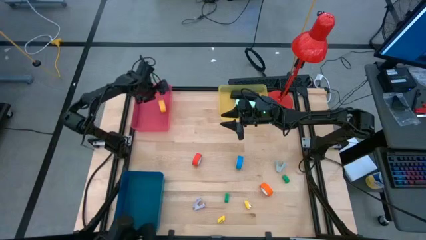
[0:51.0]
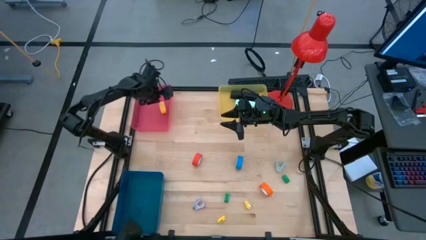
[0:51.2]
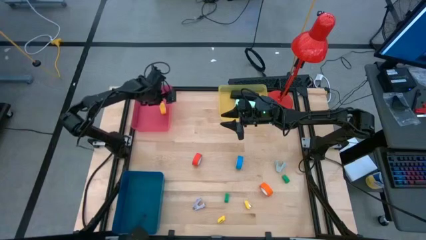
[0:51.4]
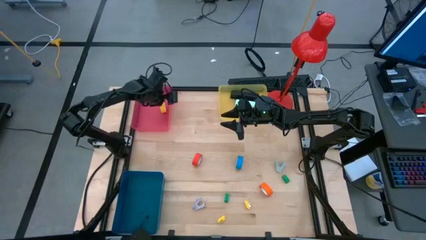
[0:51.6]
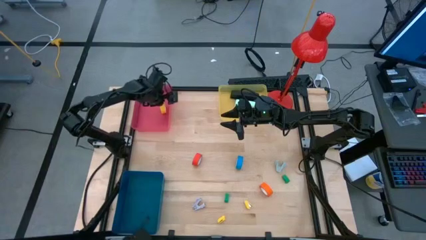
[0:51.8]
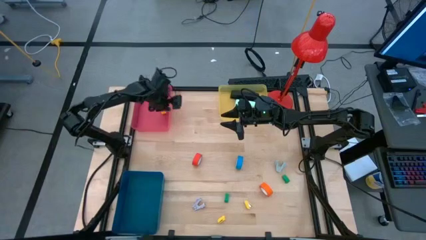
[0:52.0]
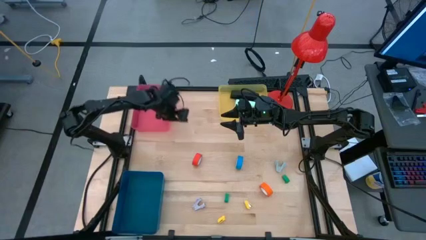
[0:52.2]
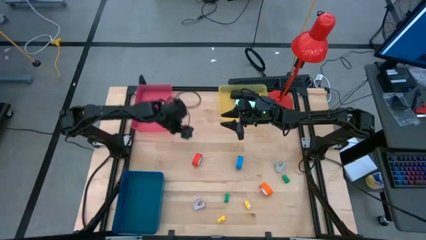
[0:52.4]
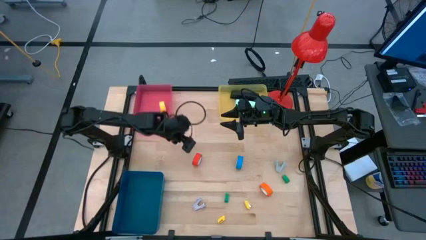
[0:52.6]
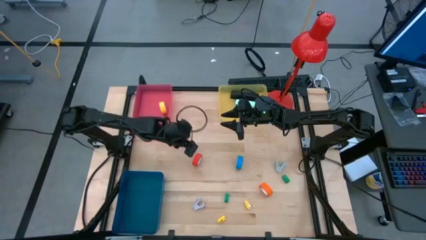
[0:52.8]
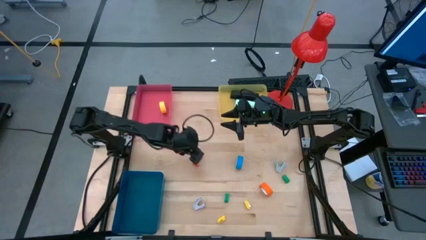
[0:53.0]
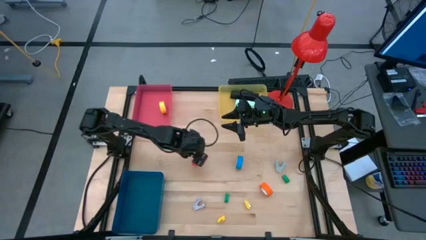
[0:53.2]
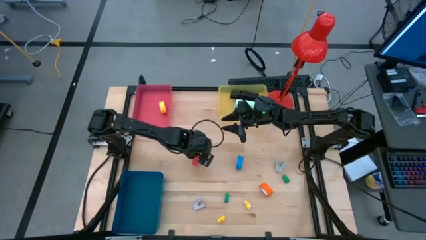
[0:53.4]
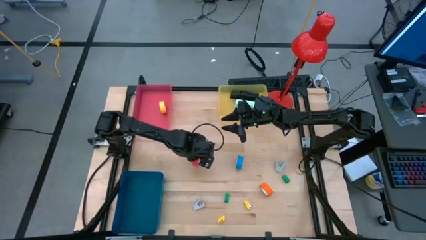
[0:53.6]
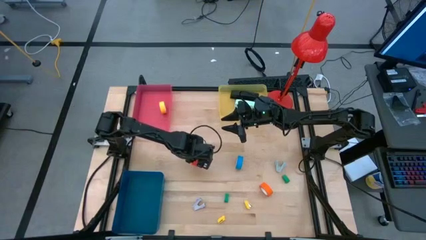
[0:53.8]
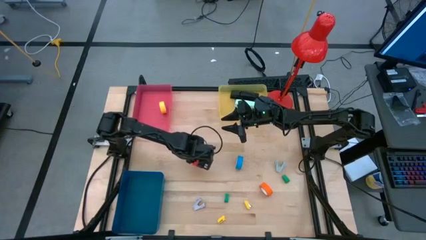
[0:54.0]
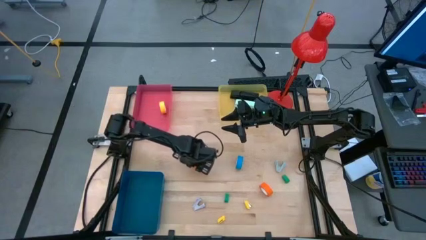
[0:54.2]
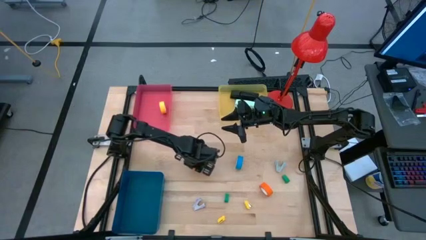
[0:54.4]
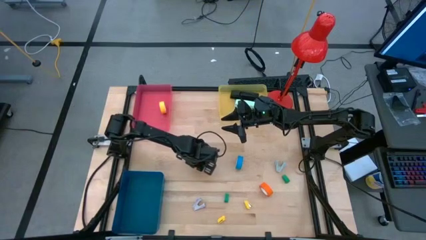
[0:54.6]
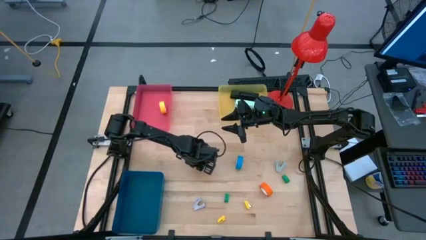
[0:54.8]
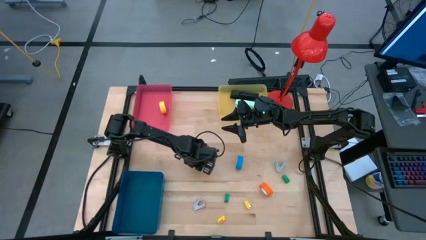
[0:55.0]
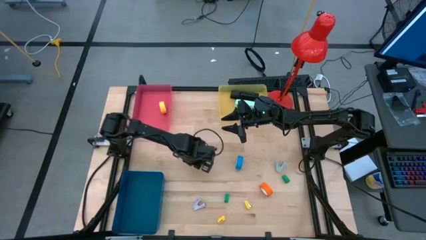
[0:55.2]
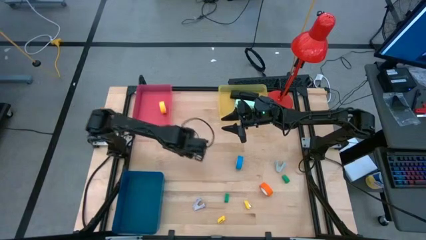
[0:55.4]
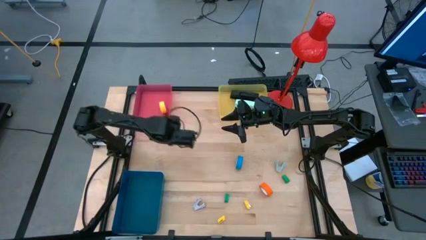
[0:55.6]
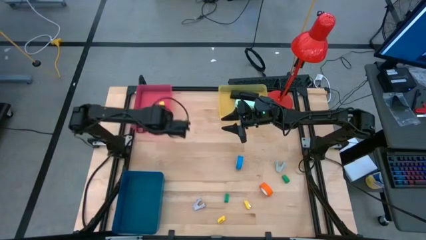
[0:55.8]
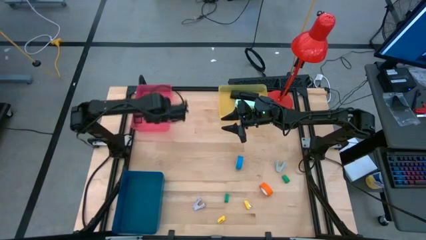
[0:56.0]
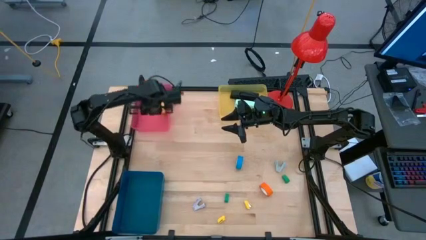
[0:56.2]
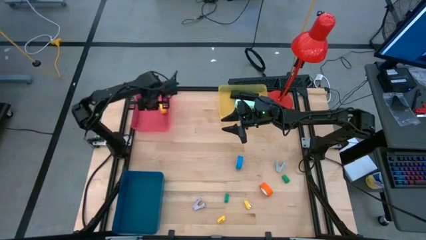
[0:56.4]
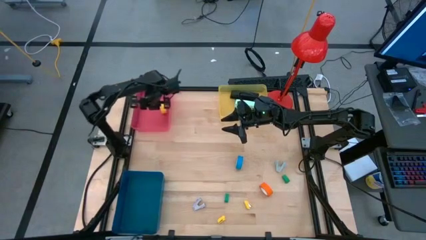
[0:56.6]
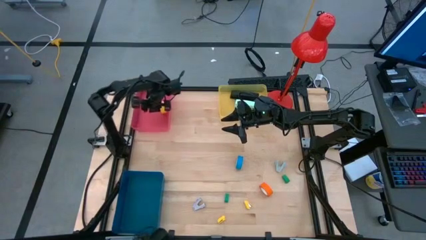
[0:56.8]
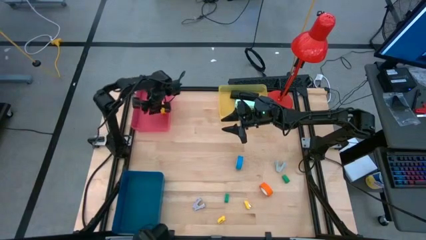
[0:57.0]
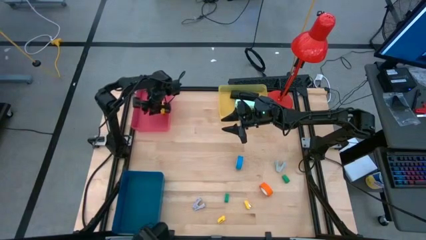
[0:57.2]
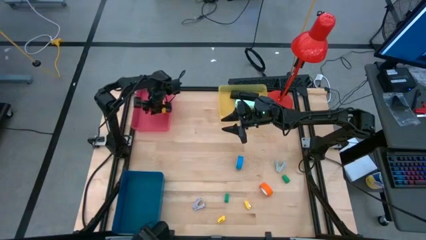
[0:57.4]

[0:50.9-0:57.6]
Task: Pick and place Stapler, Stapler remover, tape
Put the orange tape into the pink bin

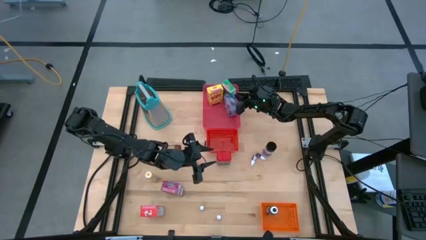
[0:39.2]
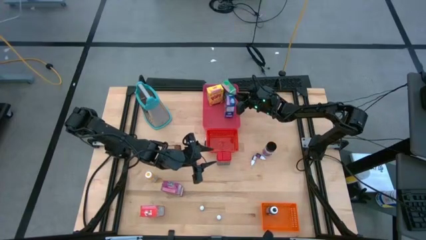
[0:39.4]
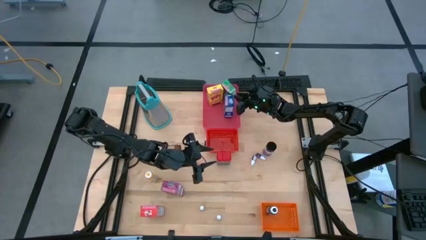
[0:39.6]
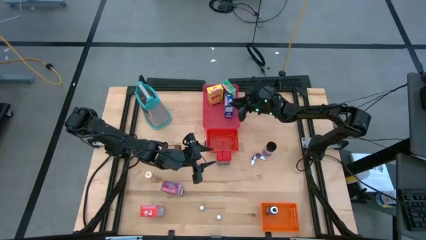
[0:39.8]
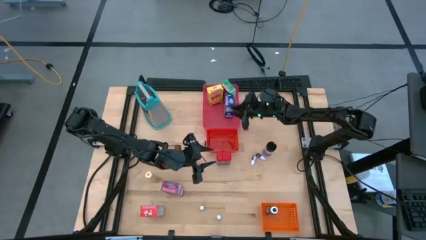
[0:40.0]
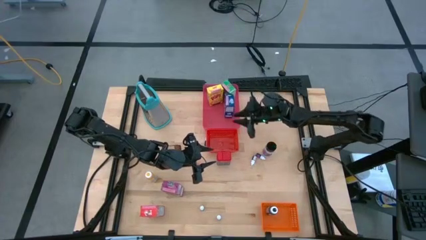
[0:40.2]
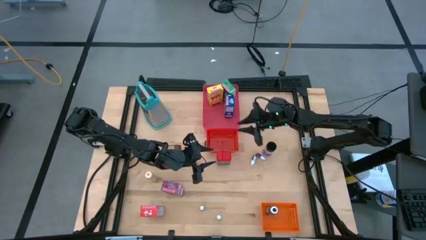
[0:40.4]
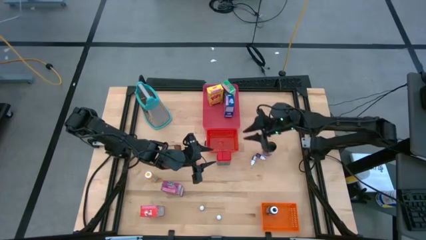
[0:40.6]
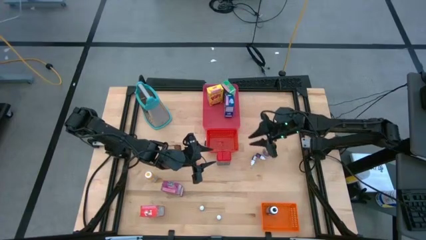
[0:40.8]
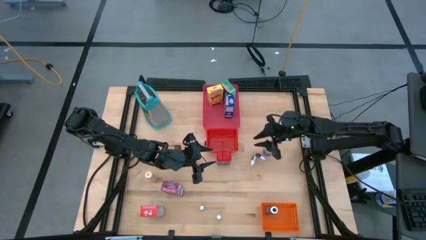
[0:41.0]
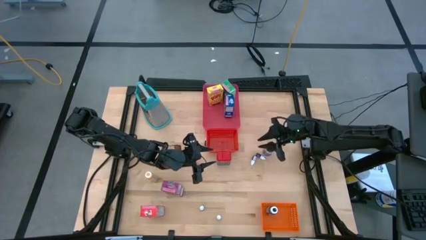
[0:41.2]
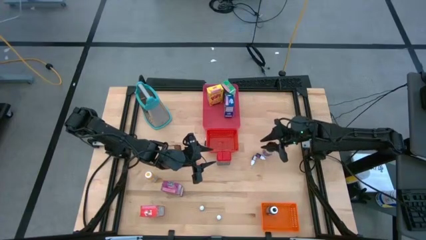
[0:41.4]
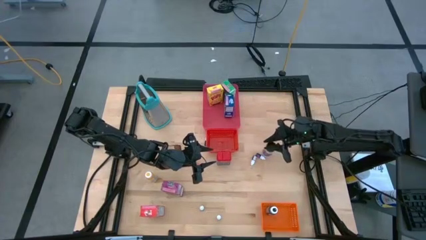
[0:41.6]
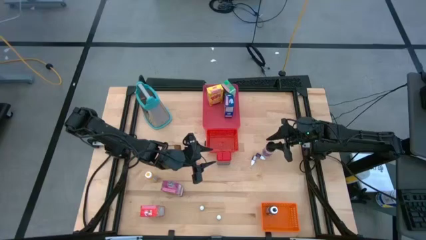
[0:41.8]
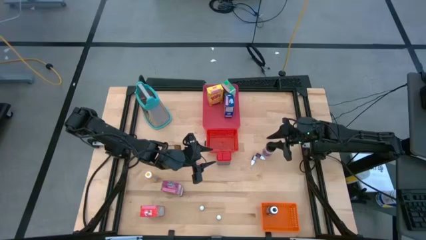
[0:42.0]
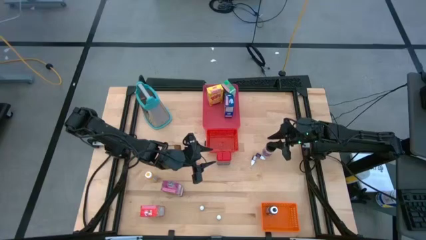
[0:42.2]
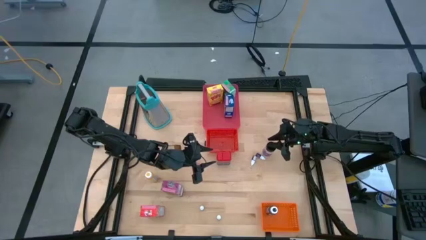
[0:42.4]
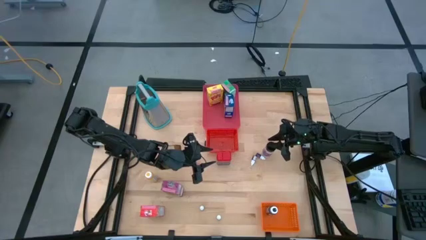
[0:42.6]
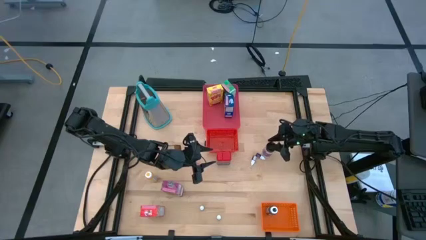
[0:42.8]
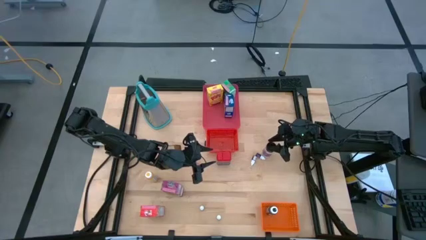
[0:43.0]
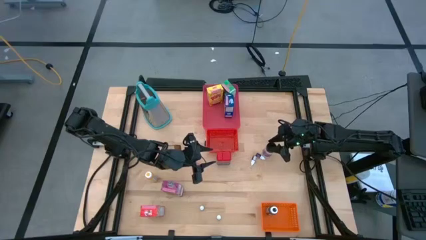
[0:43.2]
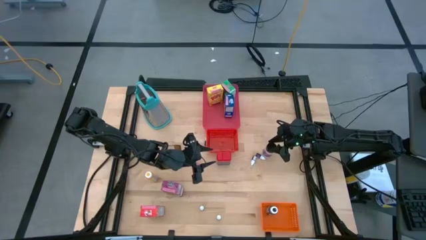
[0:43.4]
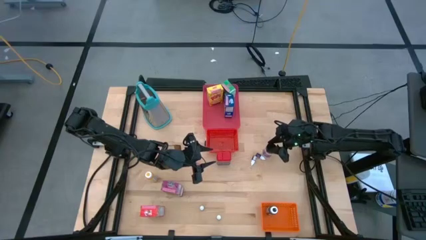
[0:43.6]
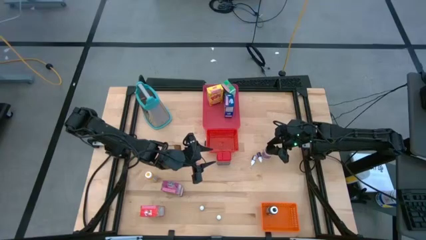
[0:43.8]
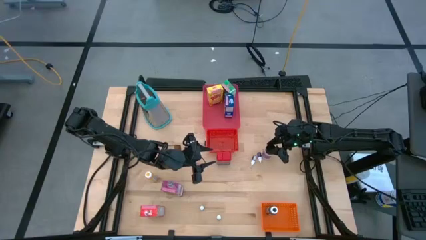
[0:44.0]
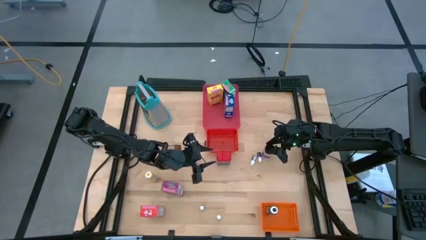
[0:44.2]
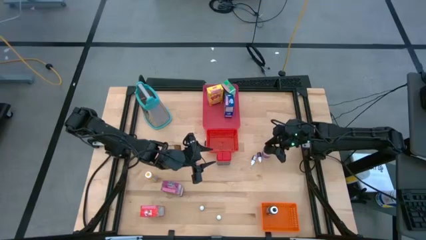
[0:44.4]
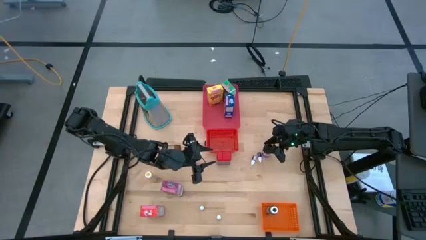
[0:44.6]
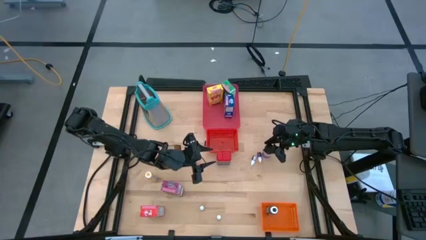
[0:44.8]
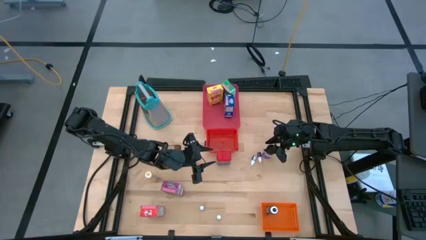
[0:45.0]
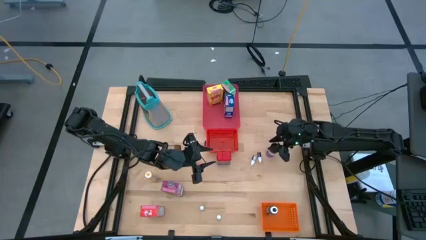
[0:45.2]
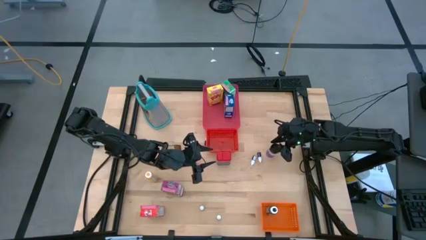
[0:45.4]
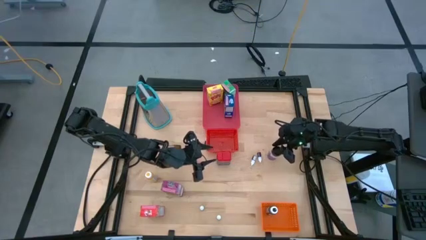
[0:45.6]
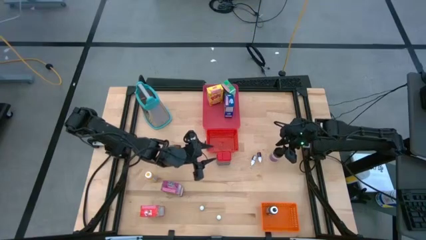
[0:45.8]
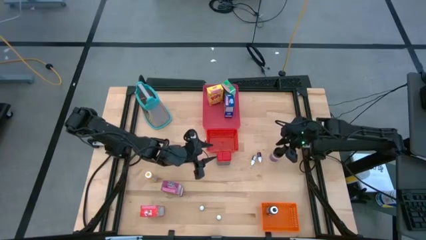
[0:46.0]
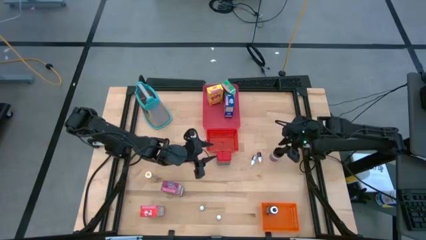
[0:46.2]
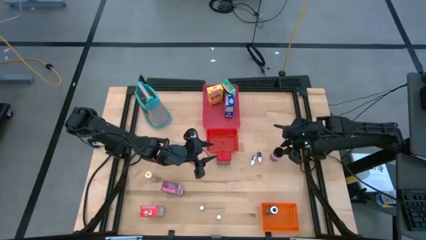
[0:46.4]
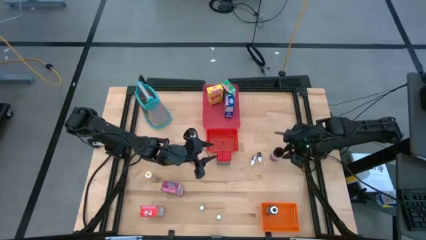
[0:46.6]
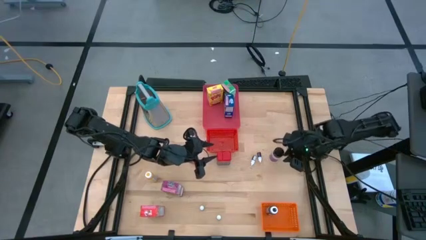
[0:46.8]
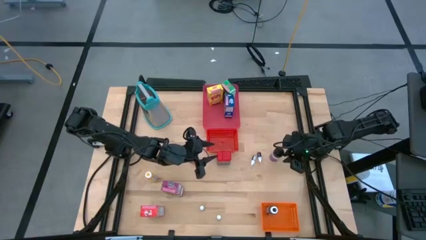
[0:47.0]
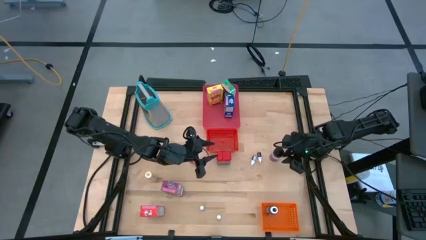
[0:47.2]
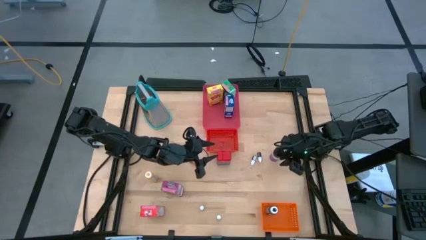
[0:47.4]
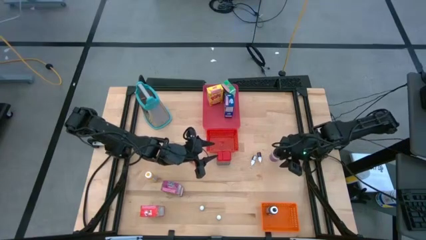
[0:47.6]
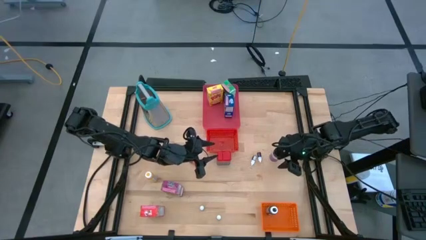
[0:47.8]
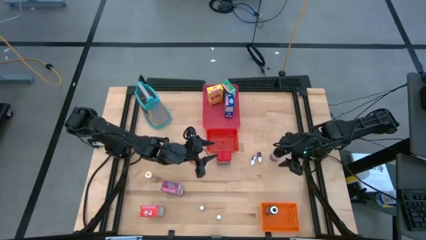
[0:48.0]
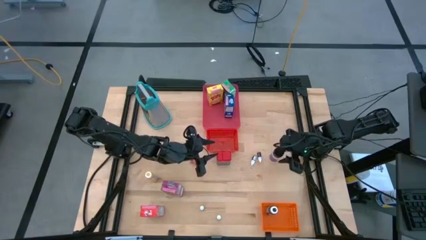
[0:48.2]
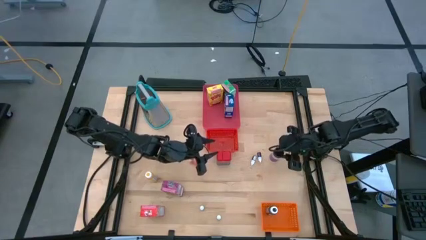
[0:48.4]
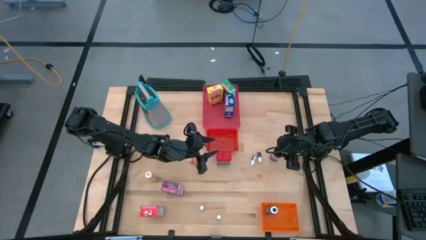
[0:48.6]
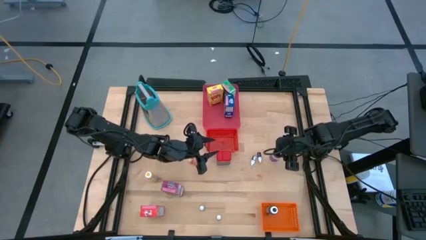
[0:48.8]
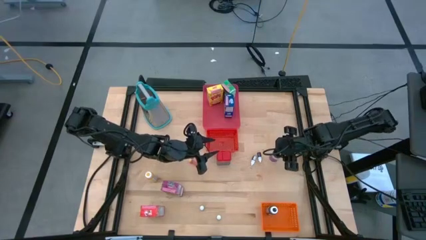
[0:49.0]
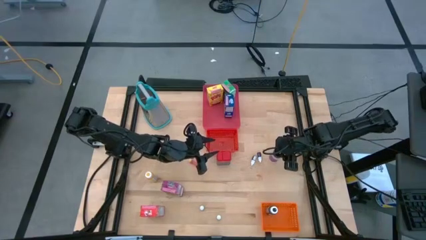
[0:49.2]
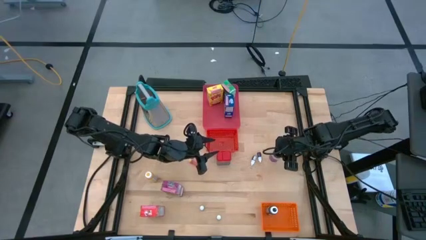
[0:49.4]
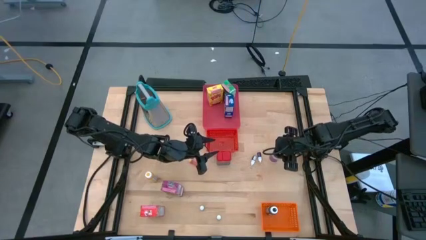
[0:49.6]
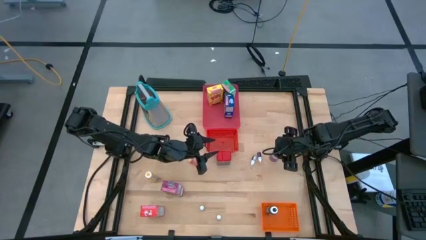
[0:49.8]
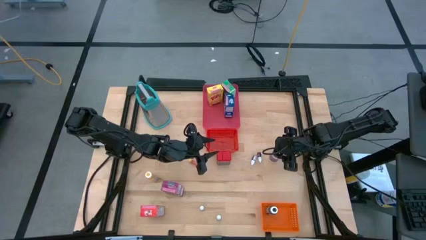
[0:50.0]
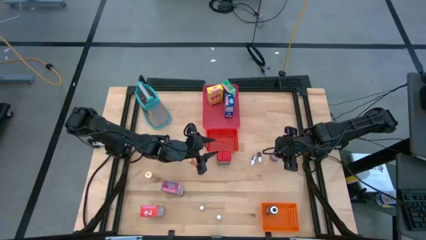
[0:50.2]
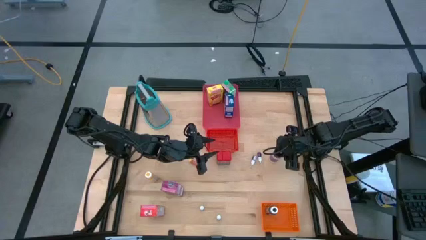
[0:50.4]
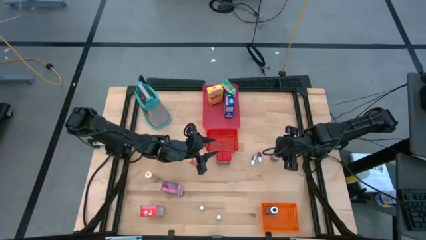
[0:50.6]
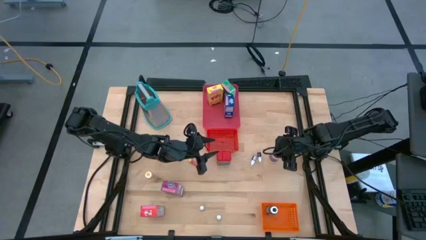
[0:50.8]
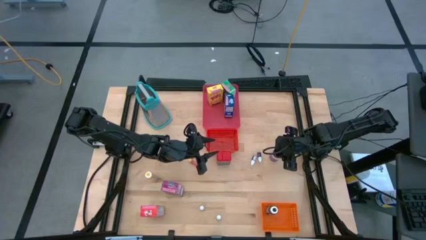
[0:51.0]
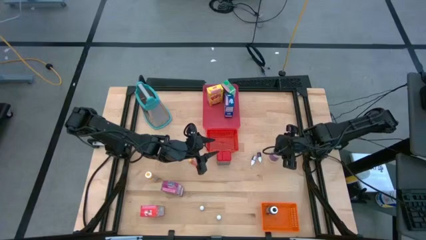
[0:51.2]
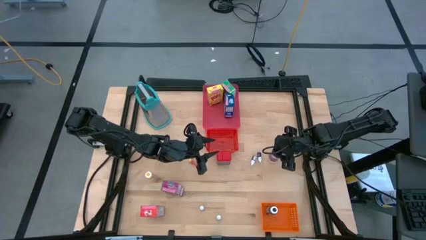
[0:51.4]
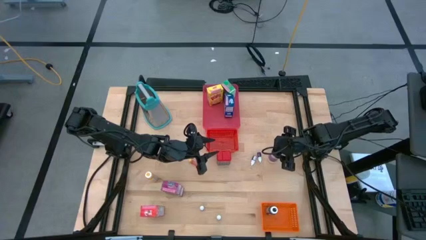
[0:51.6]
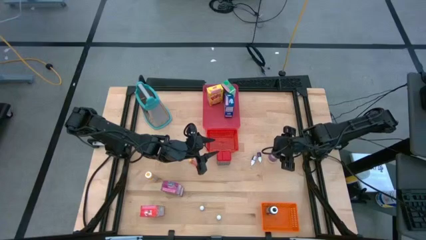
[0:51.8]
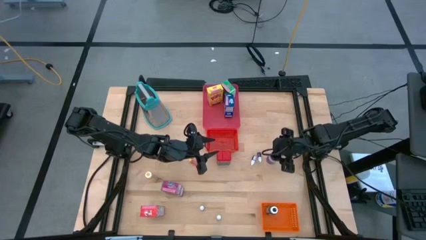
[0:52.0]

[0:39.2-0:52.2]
Task: Pick & Place Kitchen Items
Put the black seasoning bottle into the red bin
